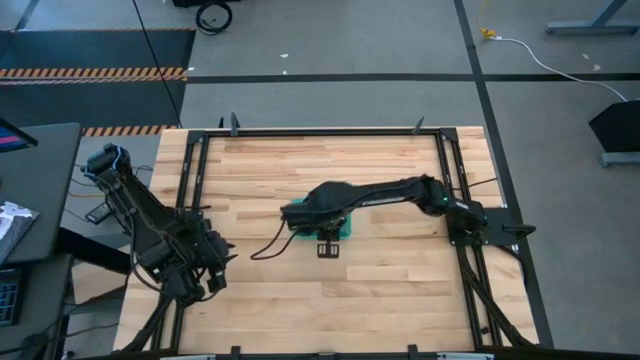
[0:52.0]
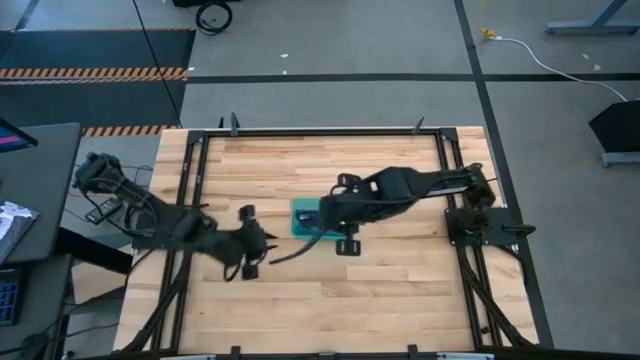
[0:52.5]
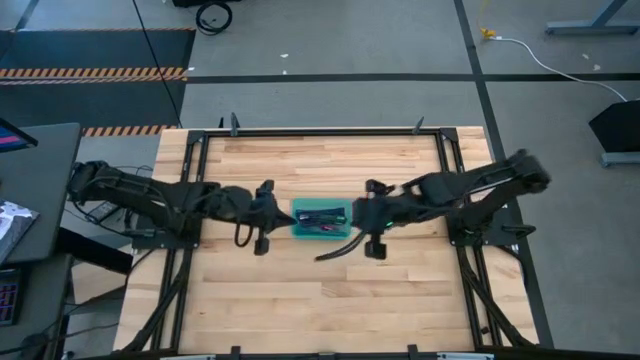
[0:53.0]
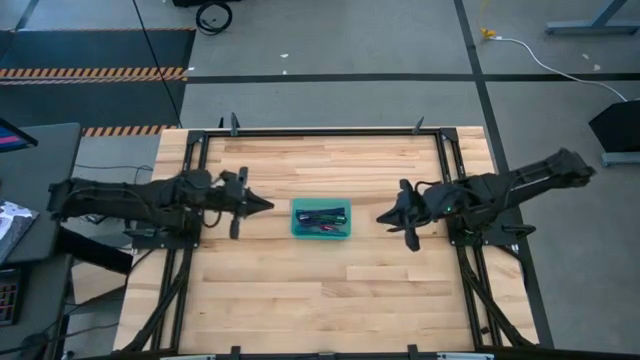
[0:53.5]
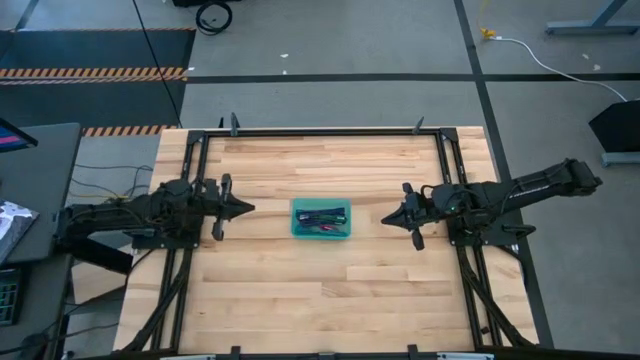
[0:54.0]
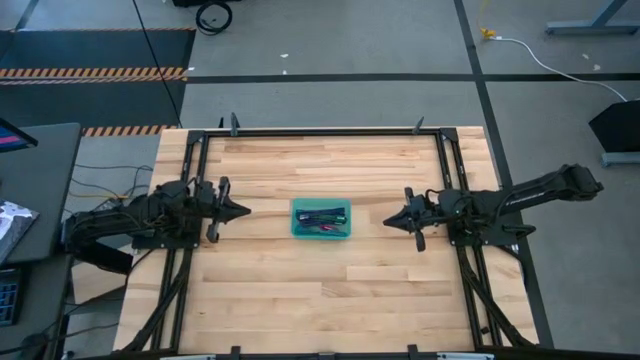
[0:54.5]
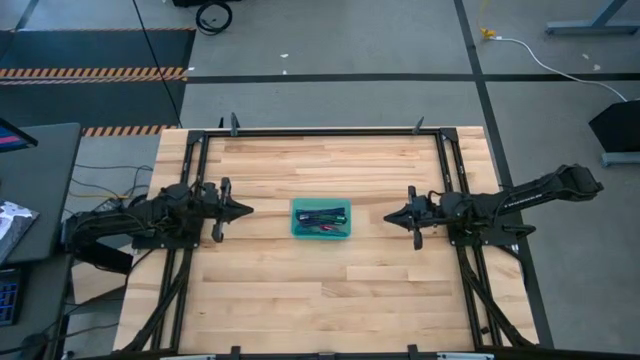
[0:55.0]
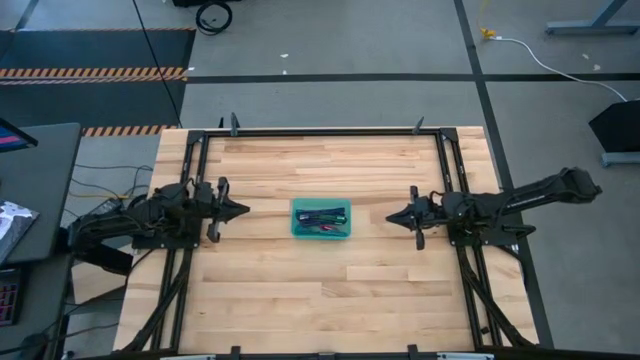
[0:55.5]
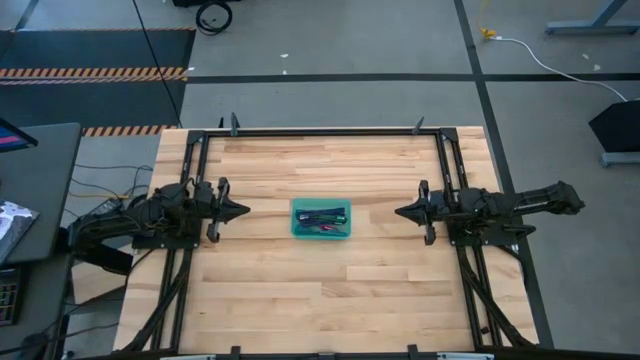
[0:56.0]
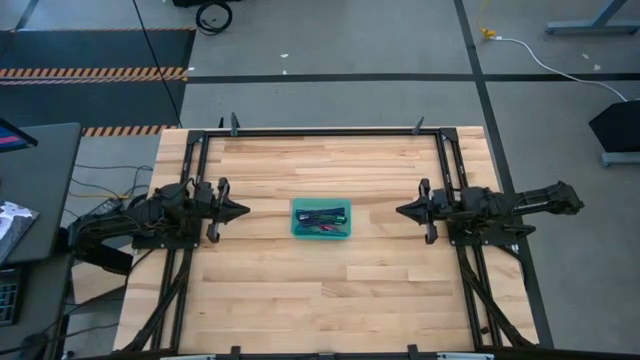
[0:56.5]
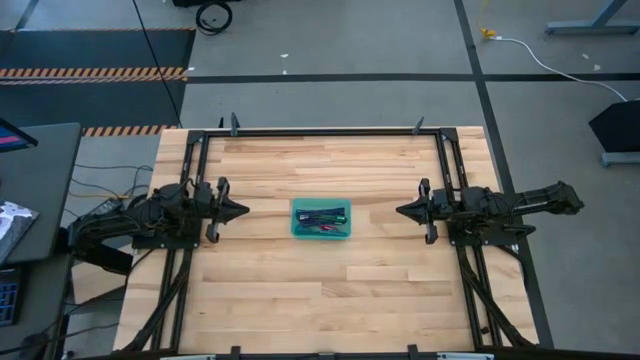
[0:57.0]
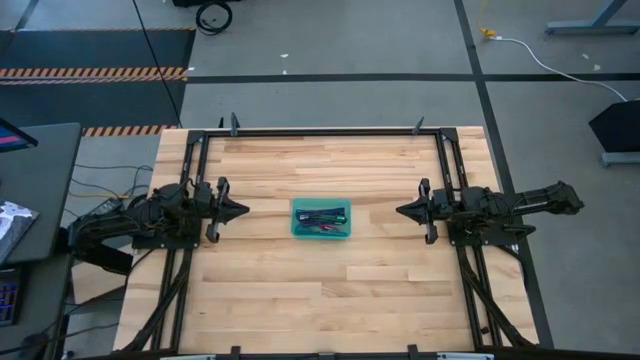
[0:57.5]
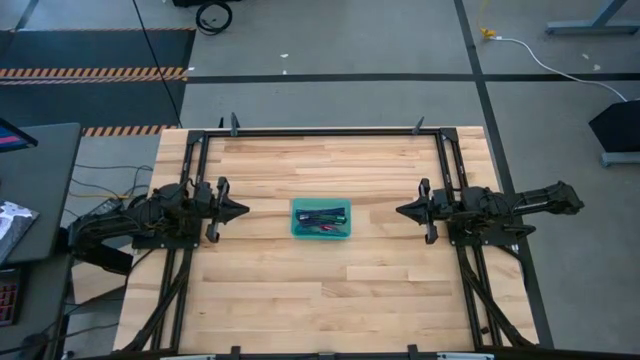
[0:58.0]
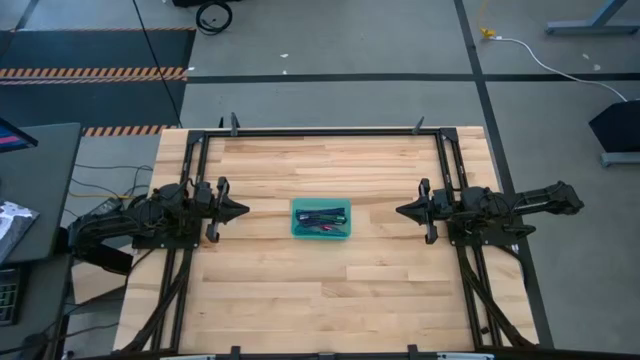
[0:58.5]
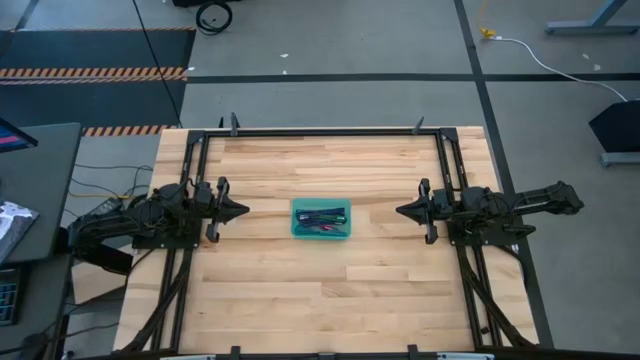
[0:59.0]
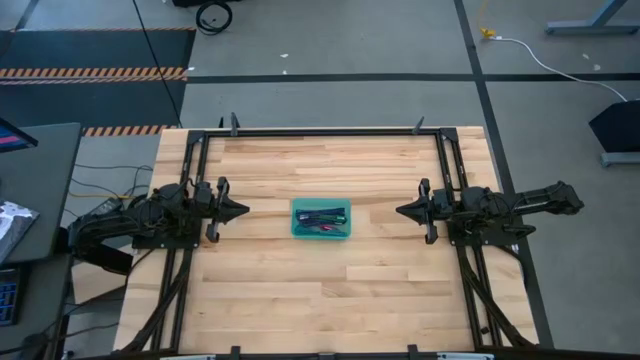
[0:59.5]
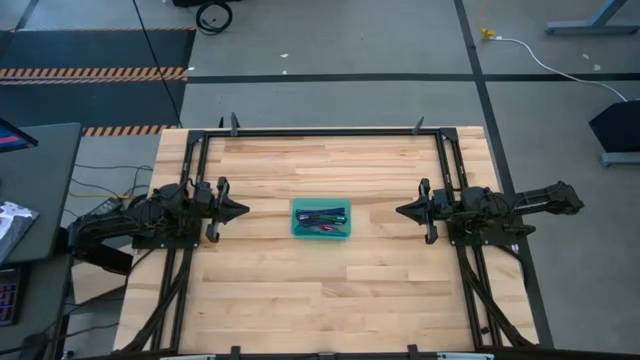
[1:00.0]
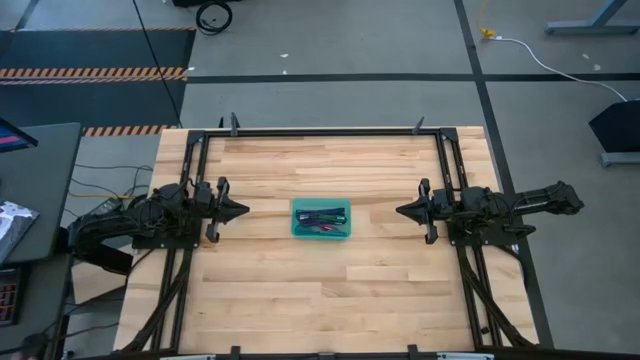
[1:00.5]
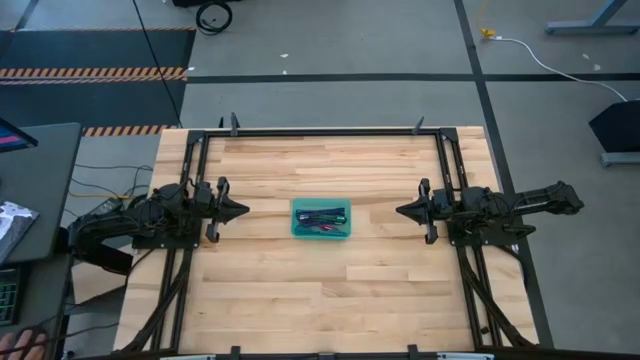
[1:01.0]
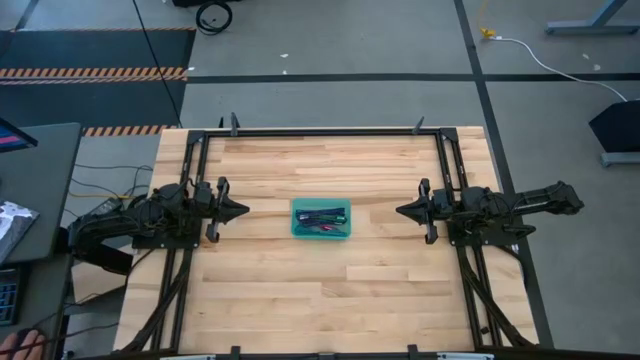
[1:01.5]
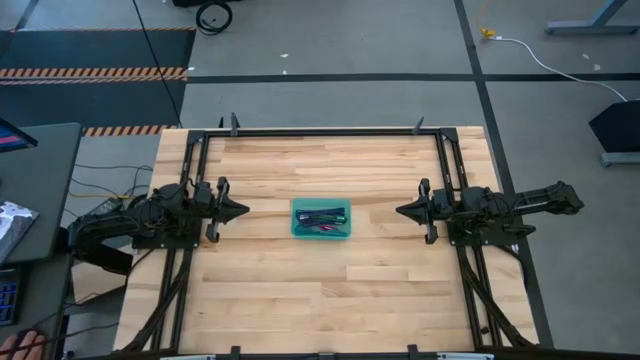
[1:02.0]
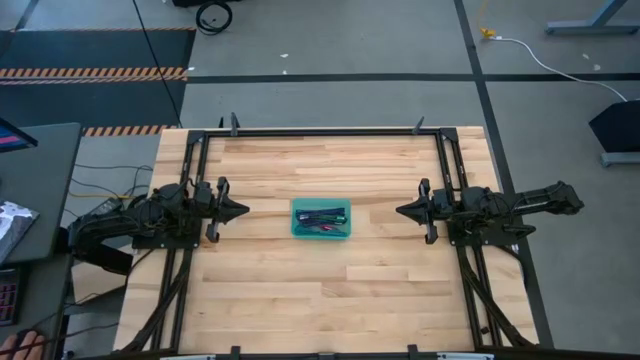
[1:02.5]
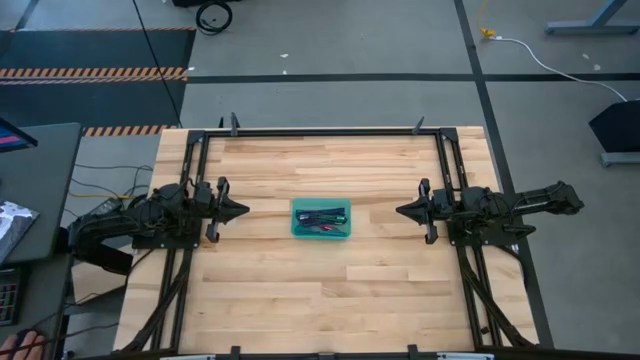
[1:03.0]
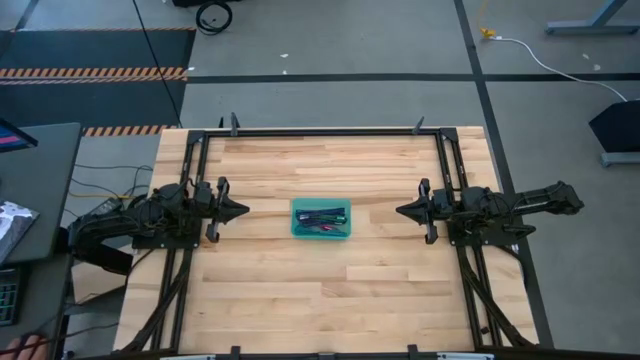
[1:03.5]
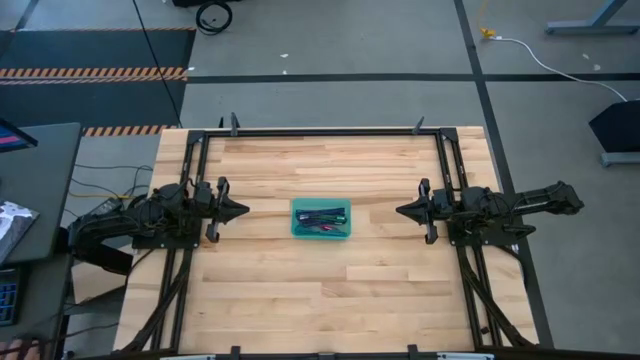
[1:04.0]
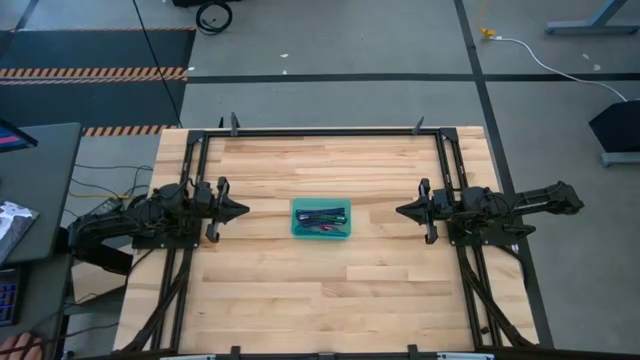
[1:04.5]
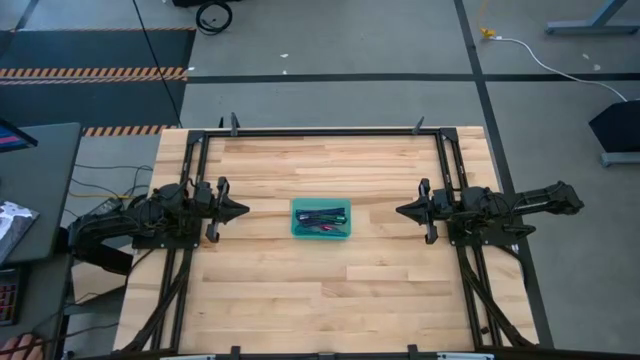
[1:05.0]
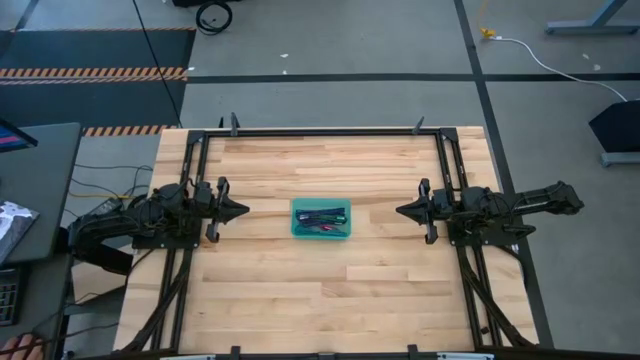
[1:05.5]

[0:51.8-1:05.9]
Task: Pick and place USB-C Cables
Return to Home Position

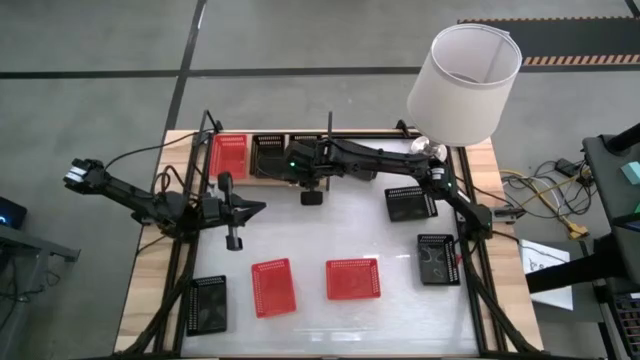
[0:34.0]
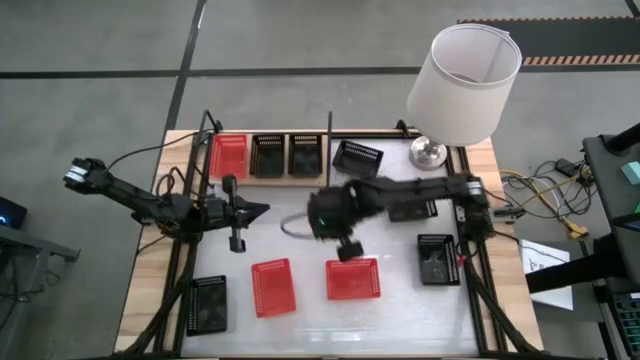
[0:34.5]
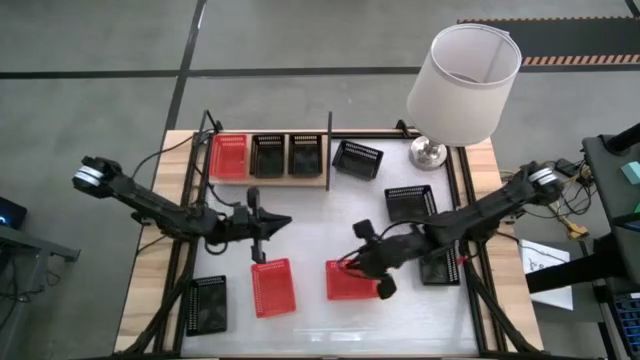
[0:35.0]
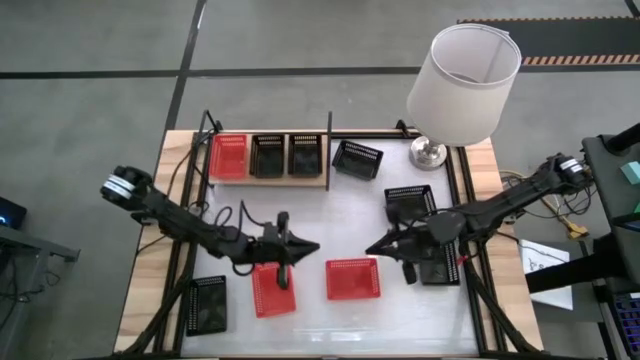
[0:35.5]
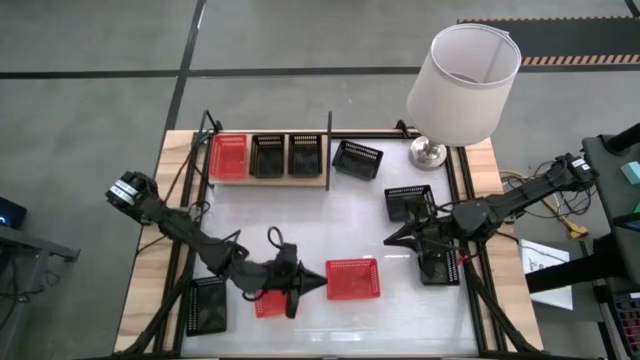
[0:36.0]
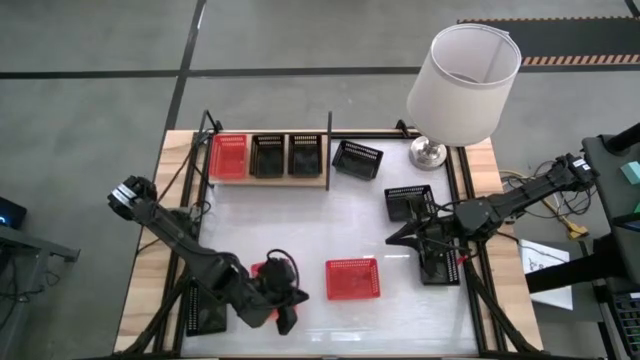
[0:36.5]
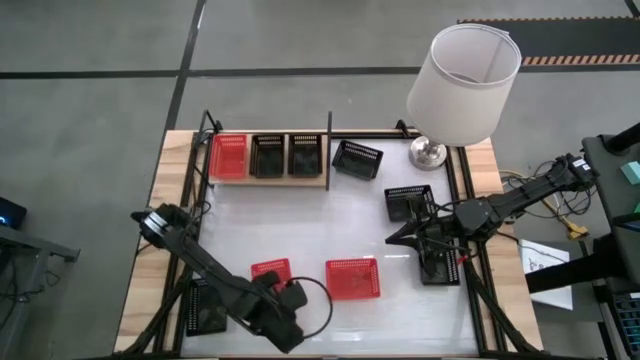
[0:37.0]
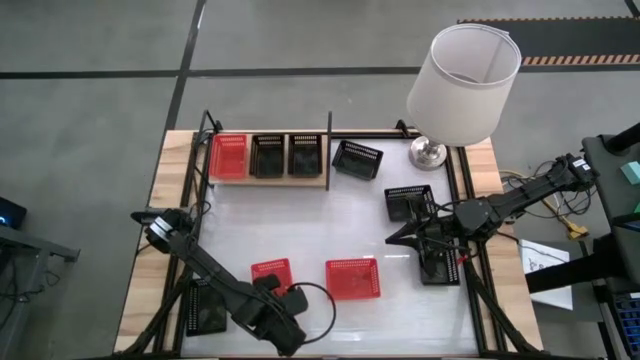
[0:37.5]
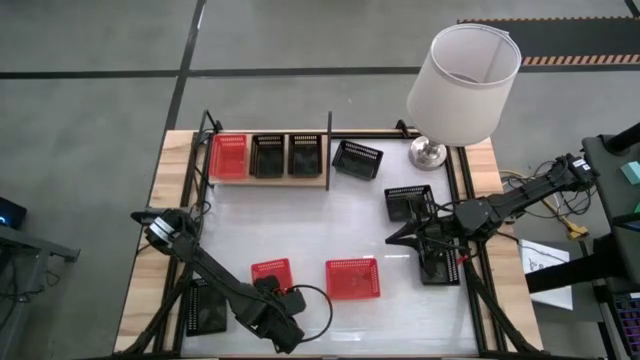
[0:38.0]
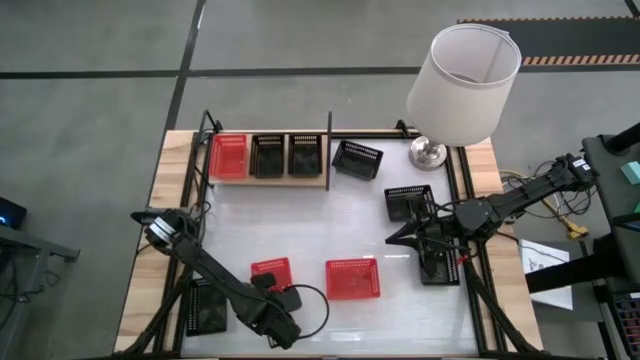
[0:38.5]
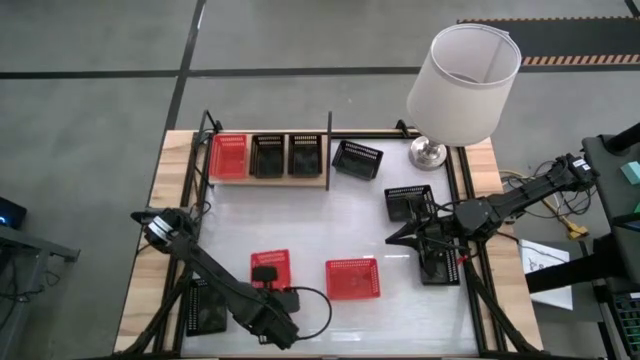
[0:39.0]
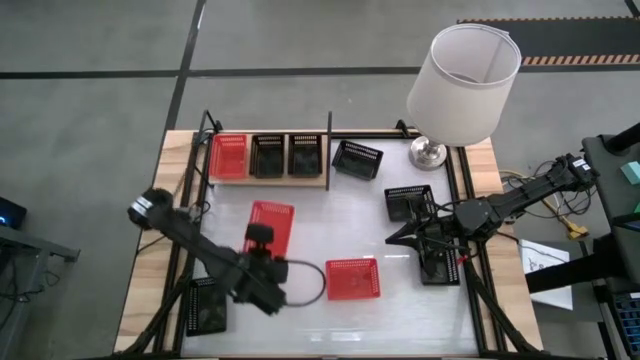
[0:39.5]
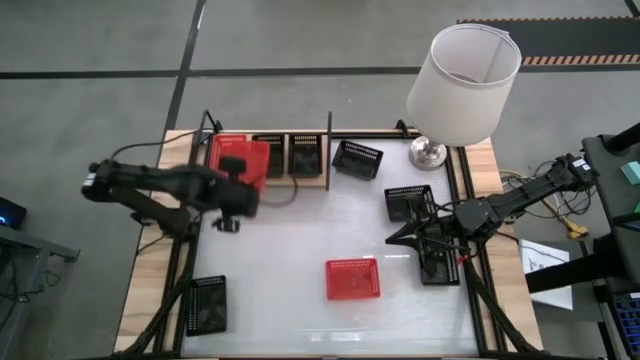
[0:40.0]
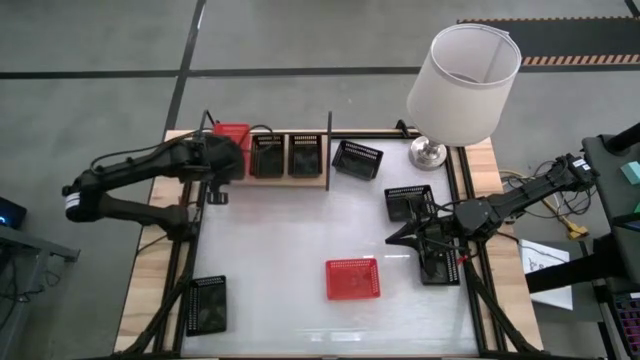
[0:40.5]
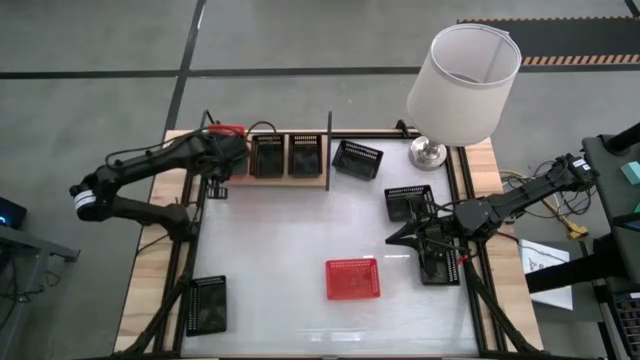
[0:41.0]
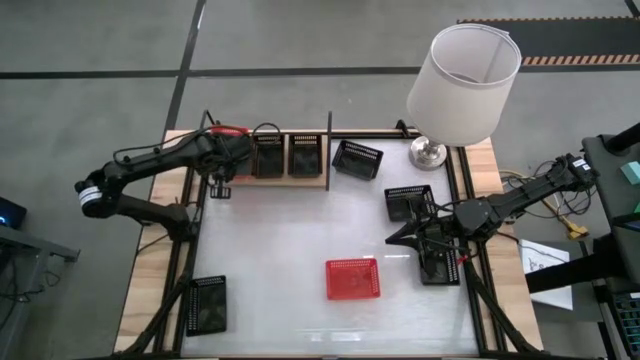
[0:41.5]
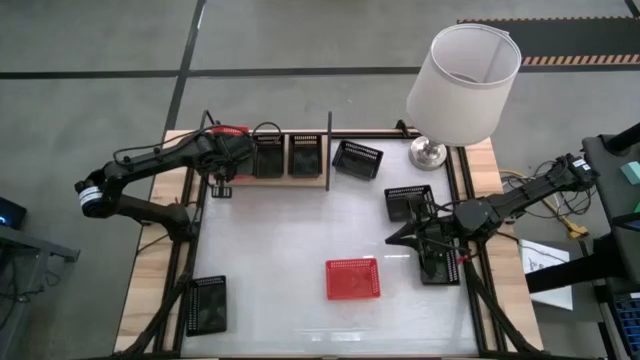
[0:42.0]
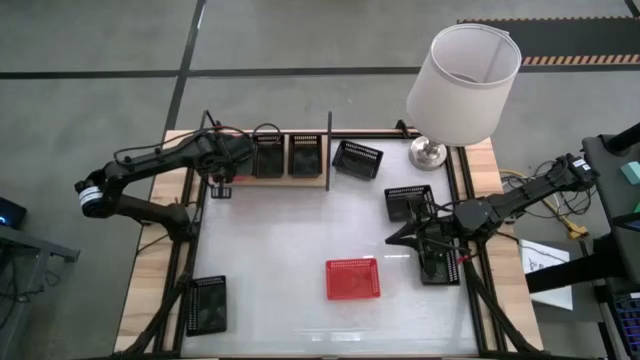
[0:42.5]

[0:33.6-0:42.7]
Task: Stack baskets on shelf by color
Stack the red basket on top of the red basket on the shelf
